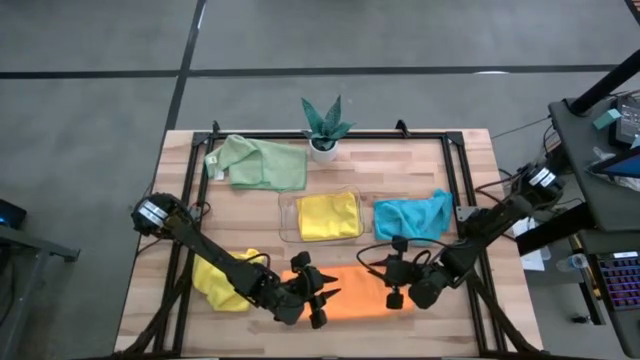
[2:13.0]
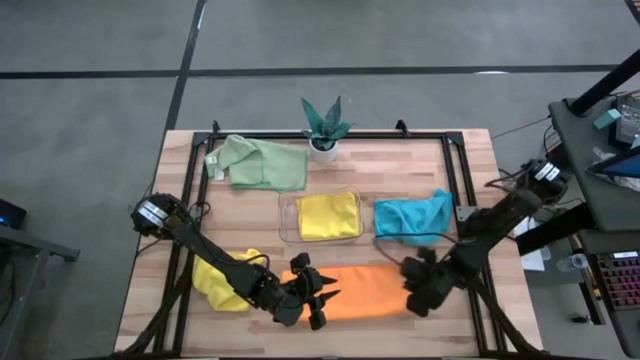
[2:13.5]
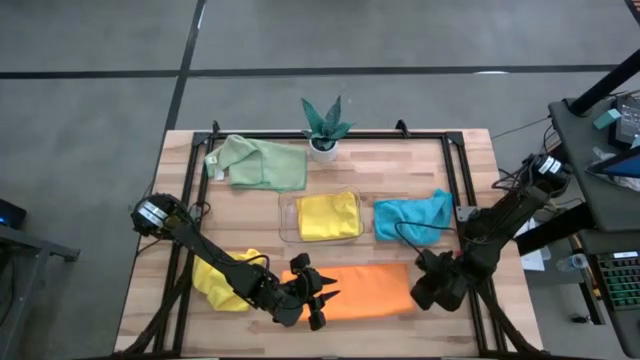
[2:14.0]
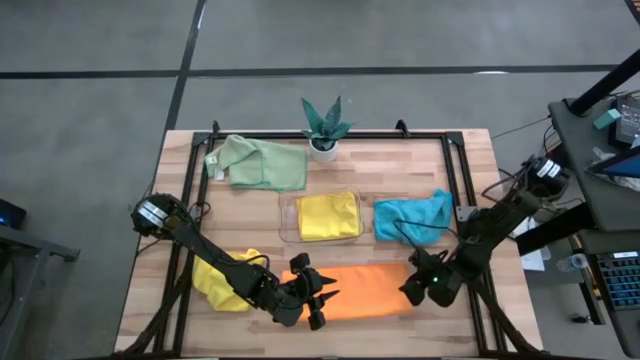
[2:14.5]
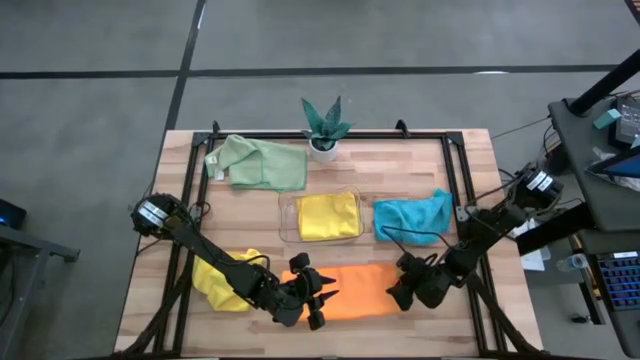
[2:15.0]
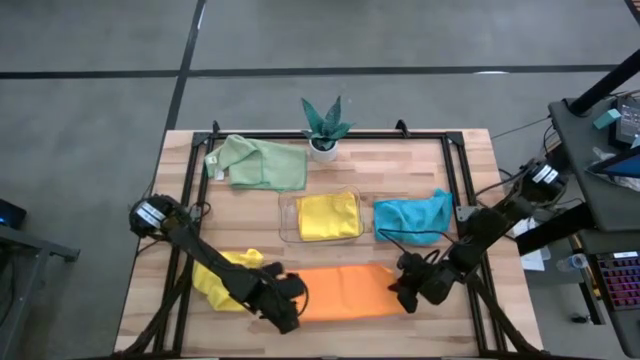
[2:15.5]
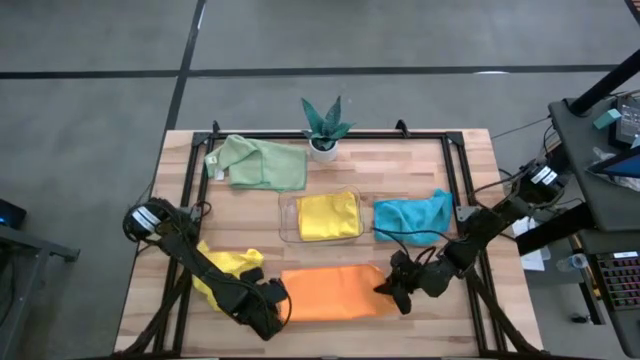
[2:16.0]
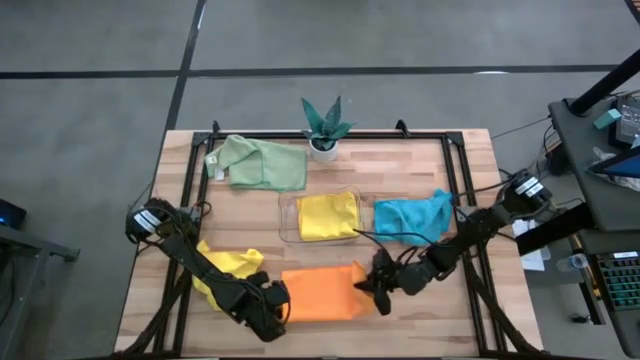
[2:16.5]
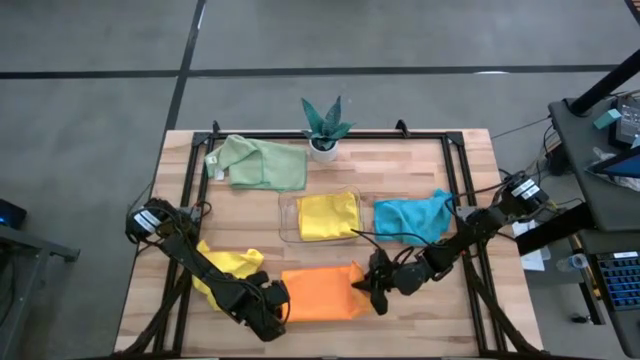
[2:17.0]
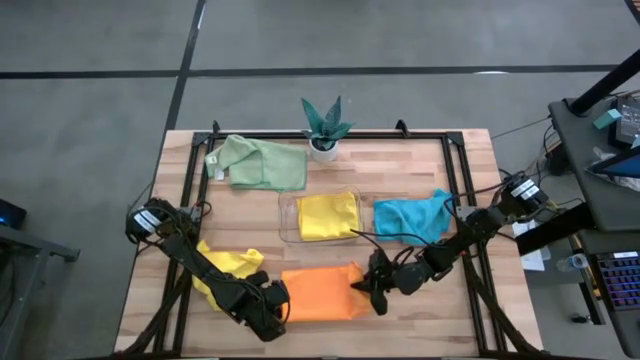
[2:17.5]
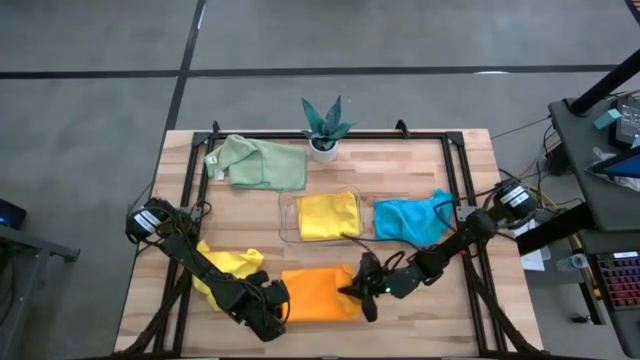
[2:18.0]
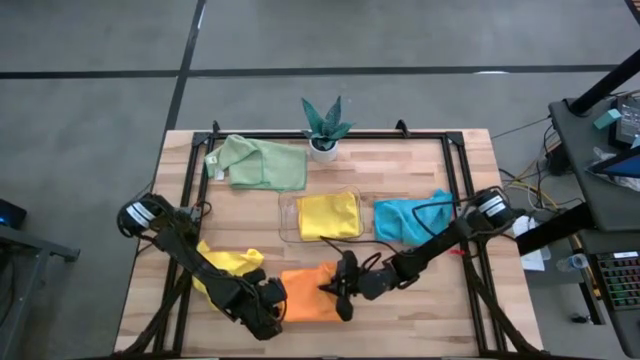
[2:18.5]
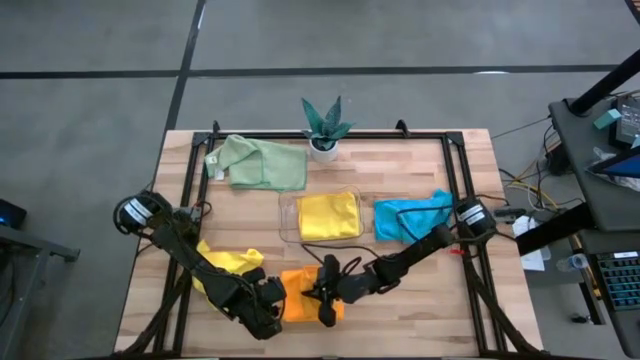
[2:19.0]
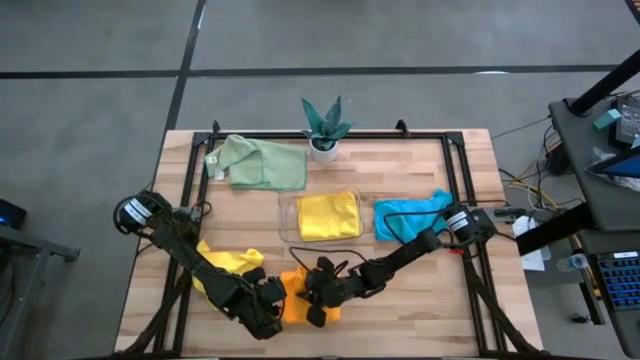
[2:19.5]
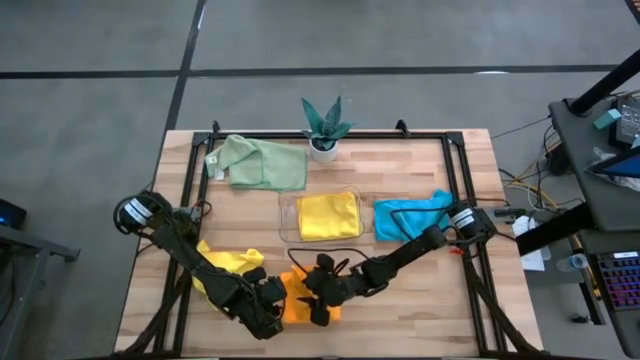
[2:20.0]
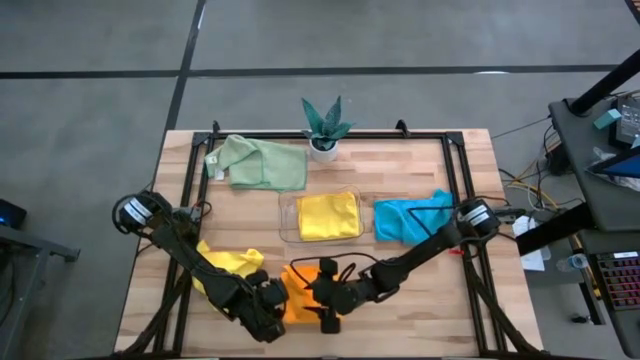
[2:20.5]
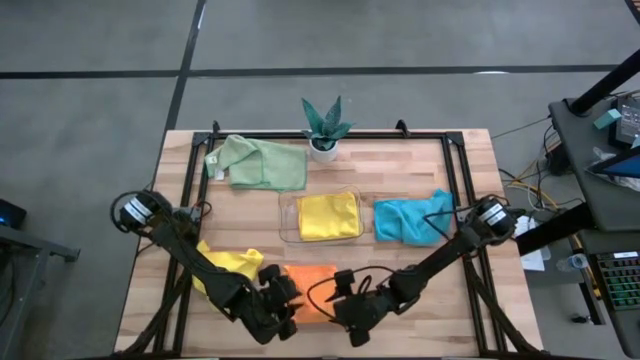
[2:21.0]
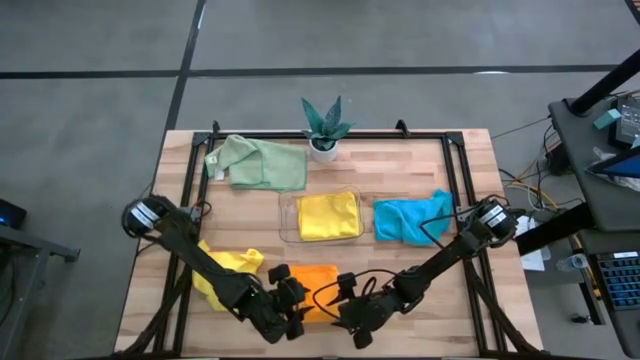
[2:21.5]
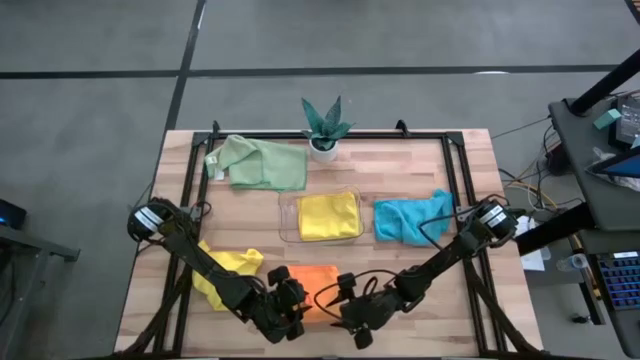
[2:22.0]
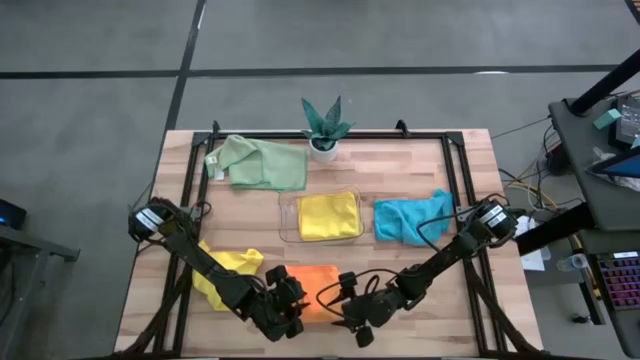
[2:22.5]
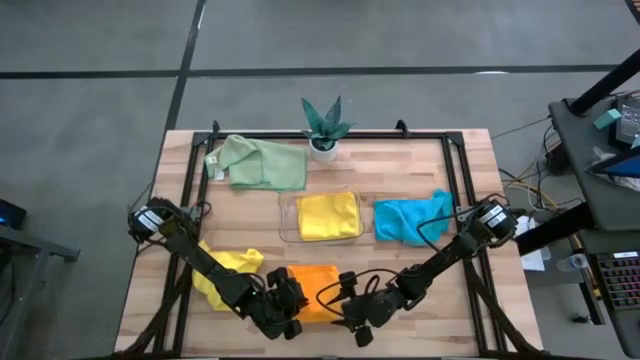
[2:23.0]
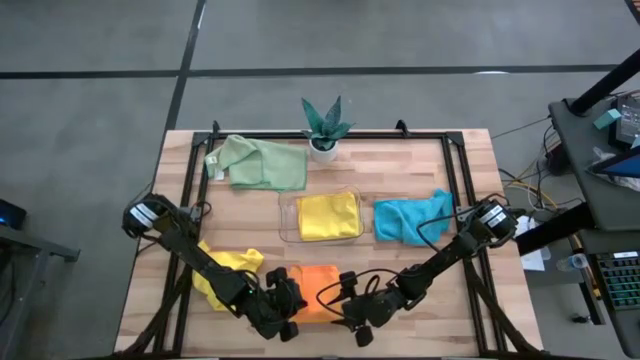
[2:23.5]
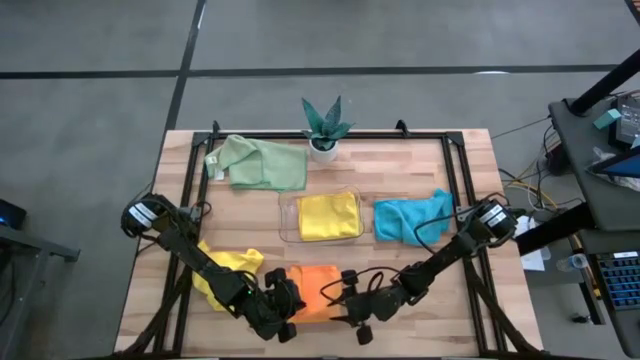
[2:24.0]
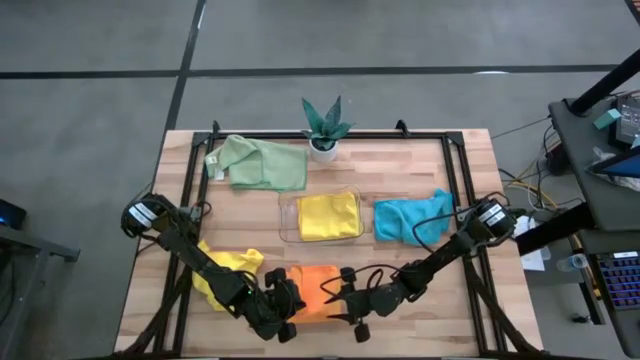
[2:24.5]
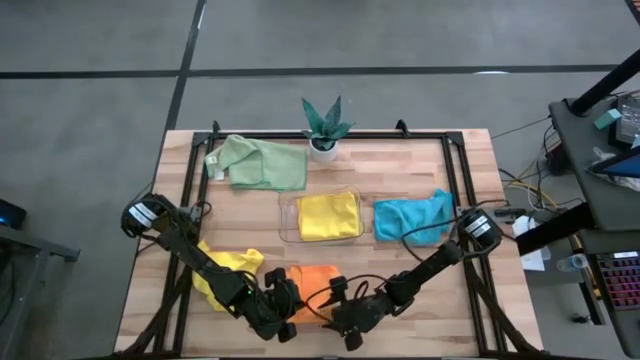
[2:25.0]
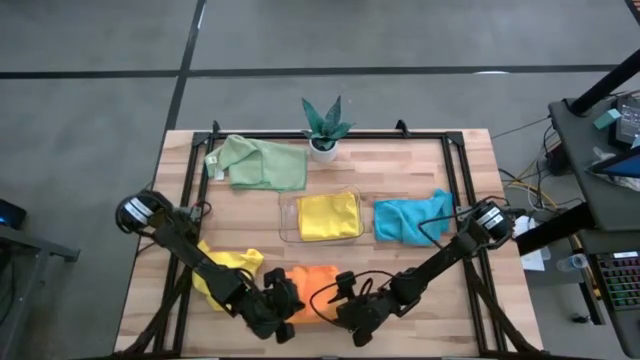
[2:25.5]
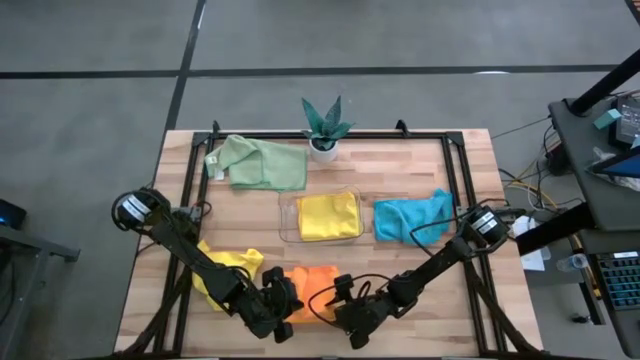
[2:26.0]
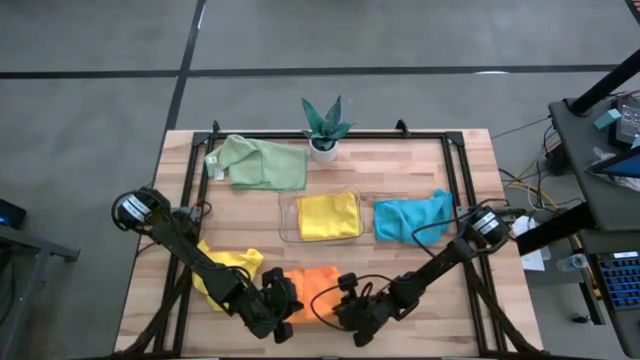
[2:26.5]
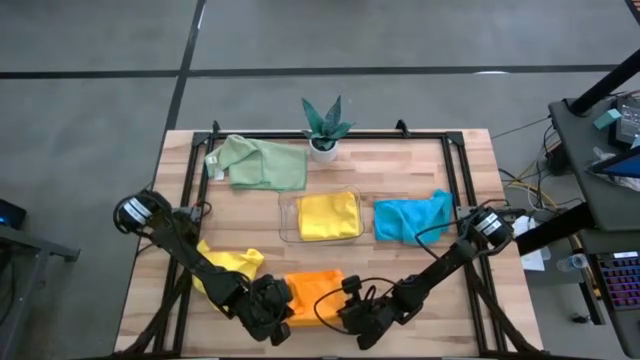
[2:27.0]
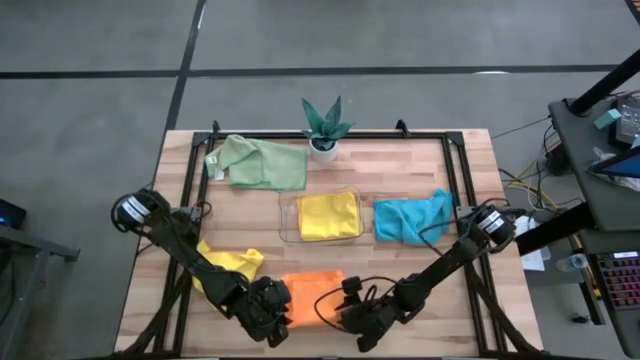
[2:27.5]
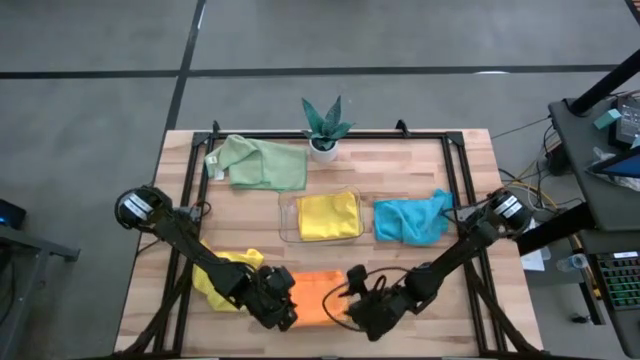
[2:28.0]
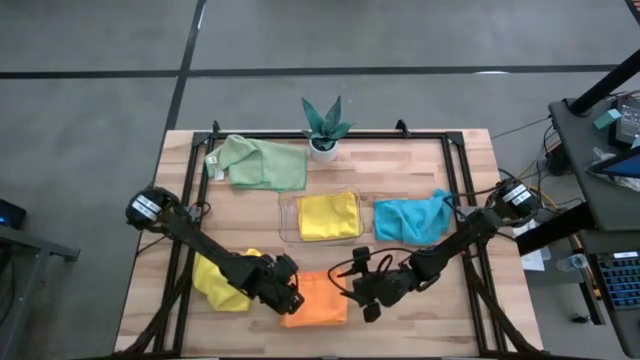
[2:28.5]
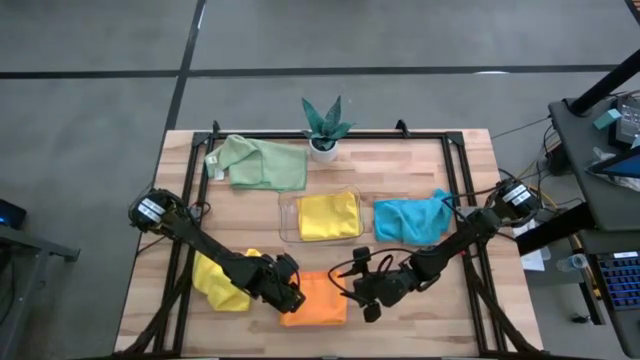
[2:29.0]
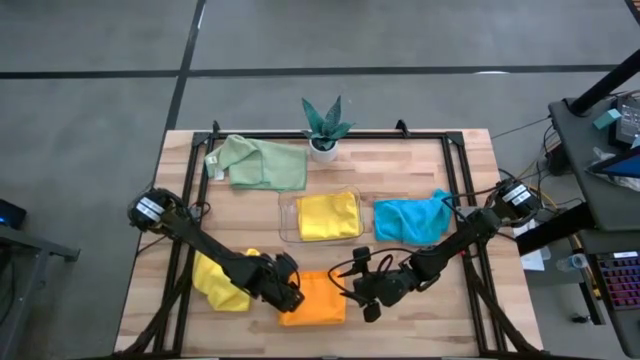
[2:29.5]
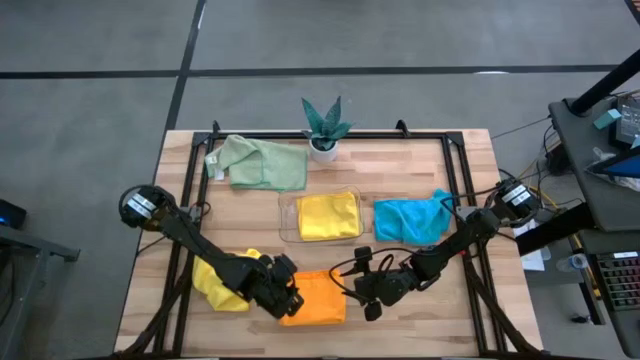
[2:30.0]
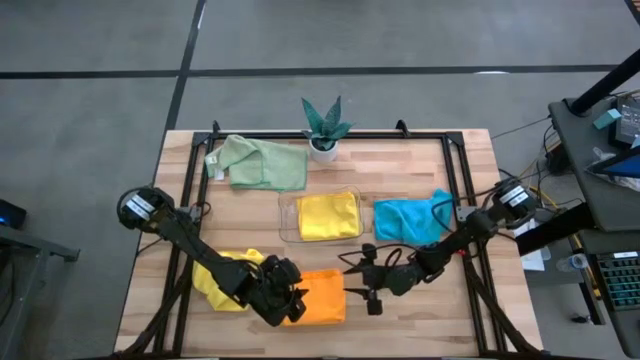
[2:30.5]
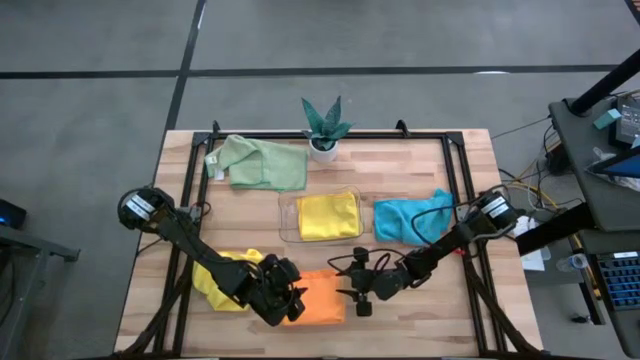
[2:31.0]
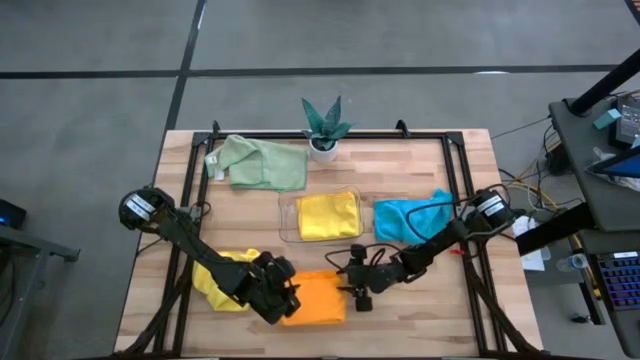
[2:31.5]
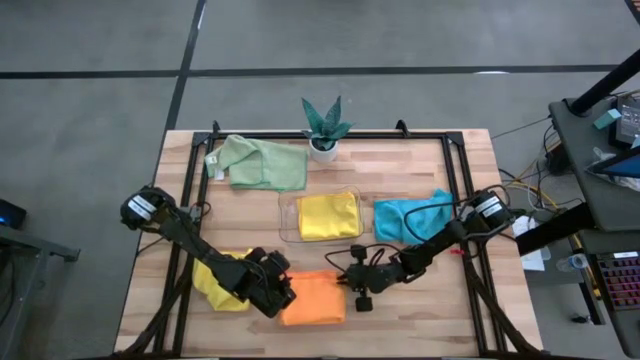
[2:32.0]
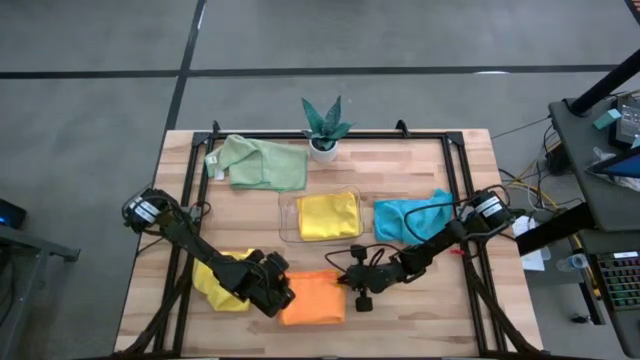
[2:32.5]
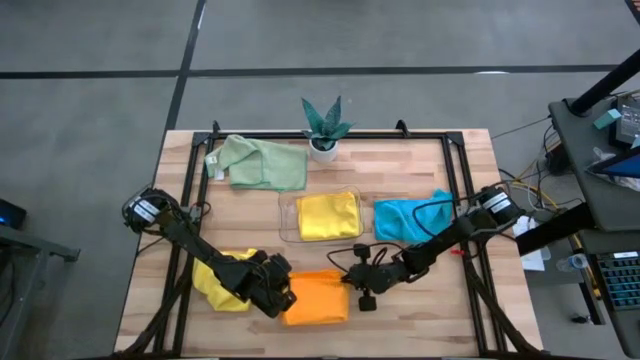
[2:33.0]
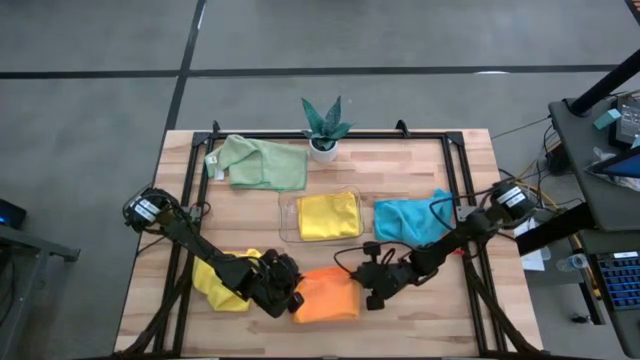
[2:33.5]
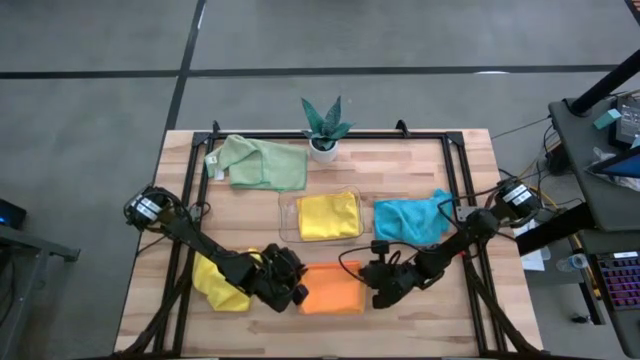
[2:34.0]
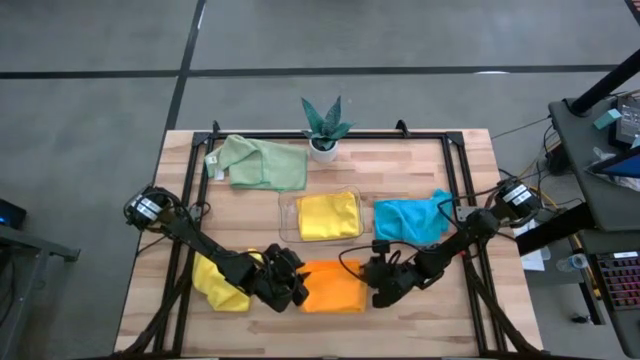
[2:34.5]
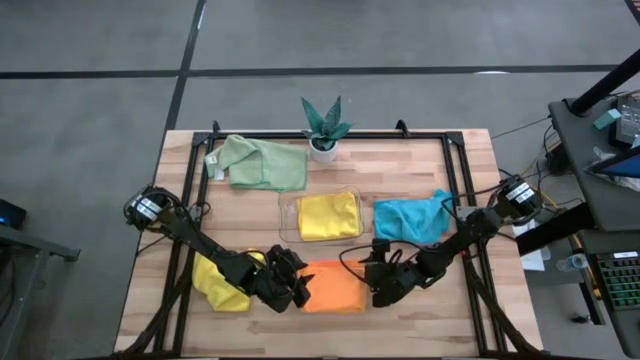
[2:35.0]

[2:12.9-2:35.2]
Task: Fold microfiber towels
Fold the orange microfiber towel
